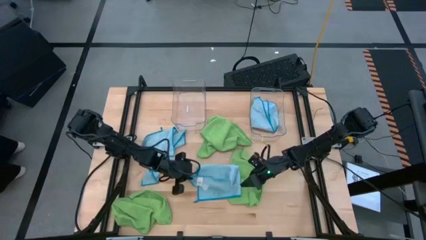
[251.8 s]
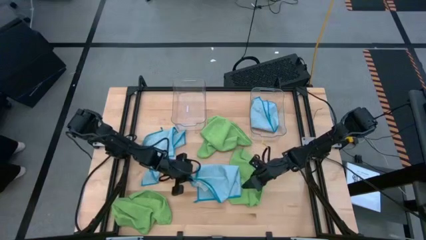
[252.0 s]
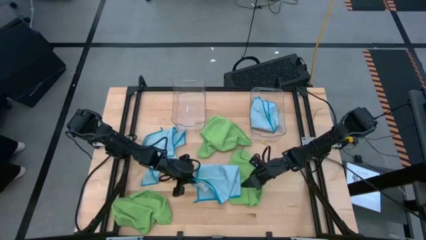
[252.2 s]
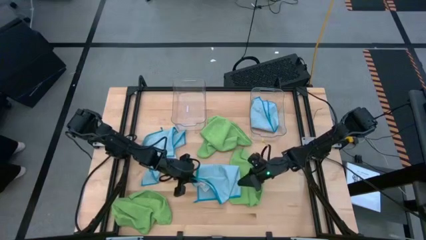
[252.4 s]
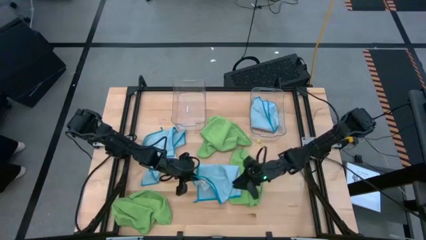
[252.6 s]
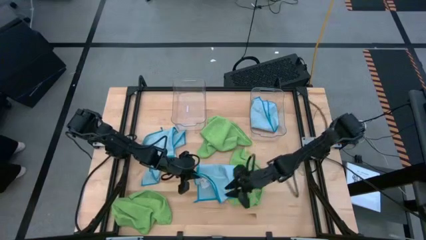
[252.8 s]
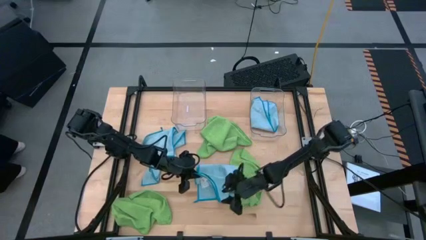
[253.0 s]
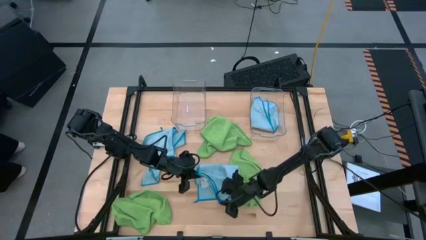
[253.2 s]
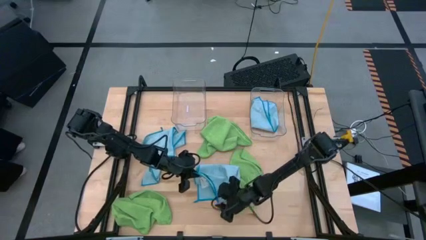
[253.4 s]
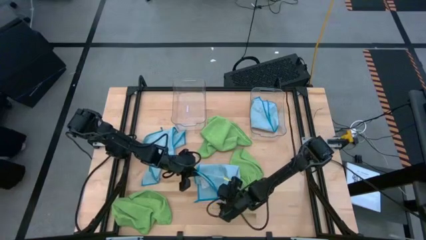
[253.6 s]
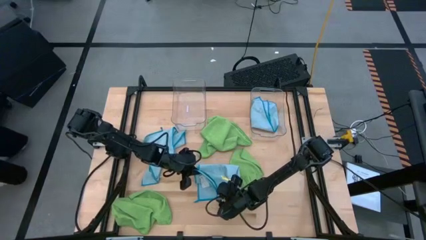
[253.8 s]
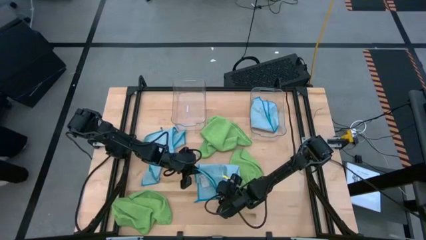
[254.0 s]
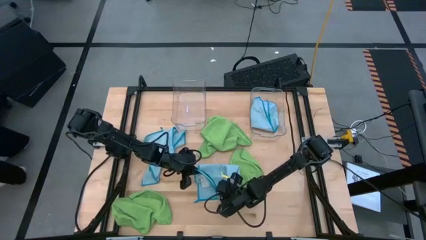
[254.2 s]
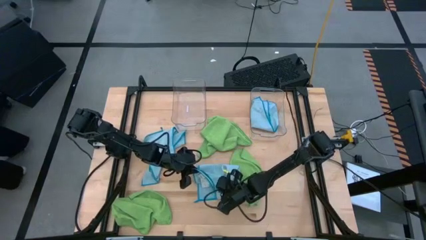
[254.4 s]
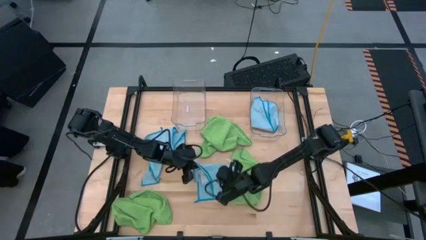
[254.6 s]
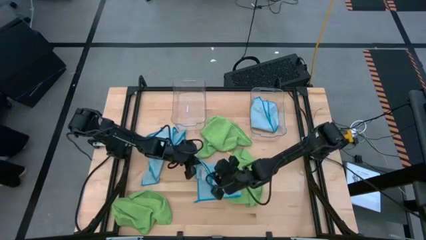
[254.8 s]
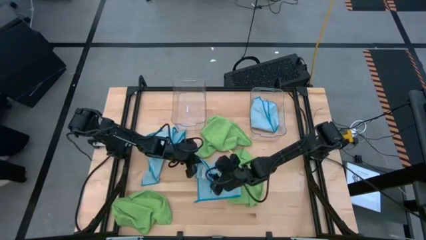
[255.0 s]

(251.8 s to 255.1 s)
Task: Fold microfiber towels
Fold the right blue microfiber towel

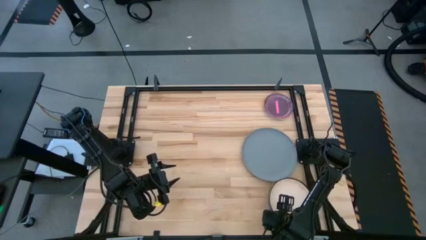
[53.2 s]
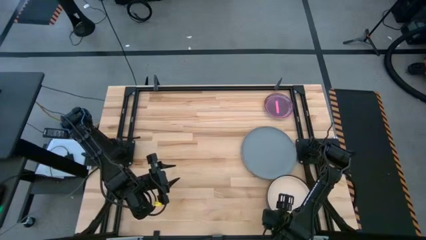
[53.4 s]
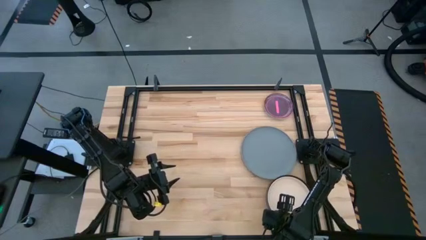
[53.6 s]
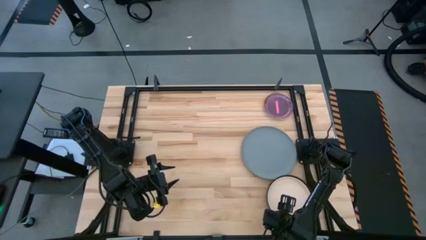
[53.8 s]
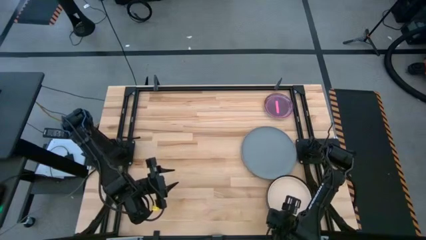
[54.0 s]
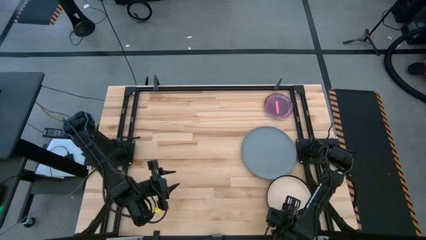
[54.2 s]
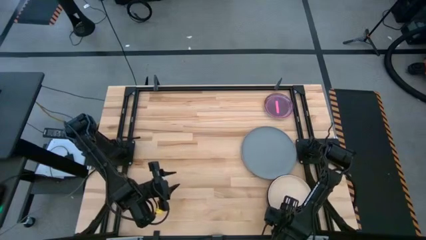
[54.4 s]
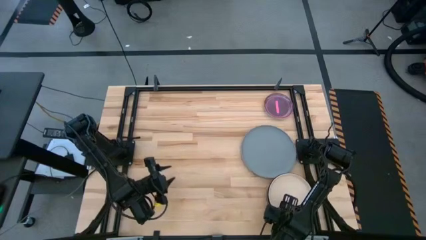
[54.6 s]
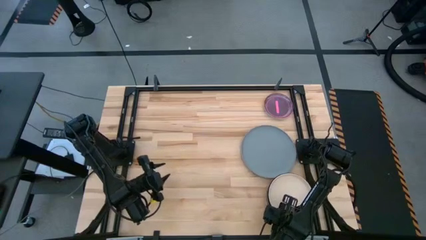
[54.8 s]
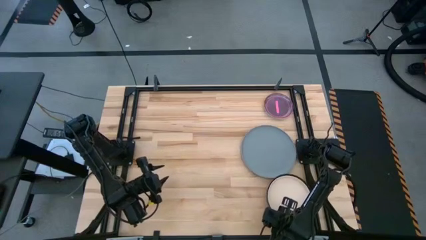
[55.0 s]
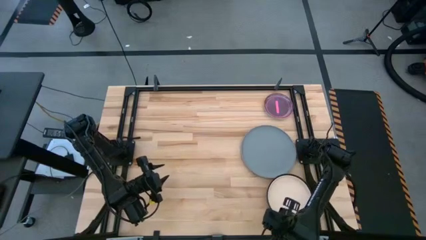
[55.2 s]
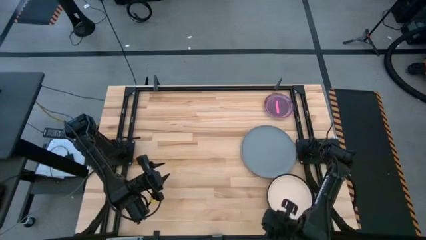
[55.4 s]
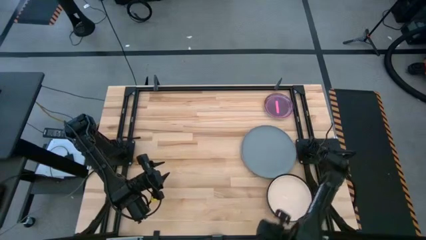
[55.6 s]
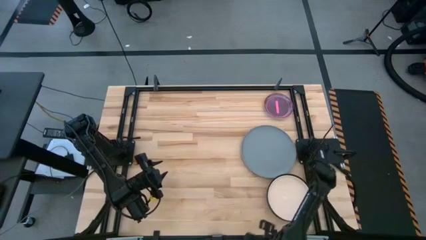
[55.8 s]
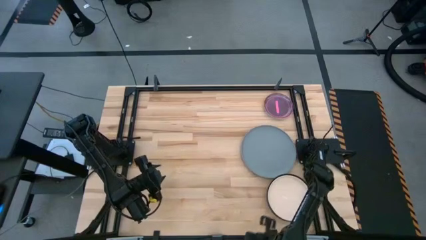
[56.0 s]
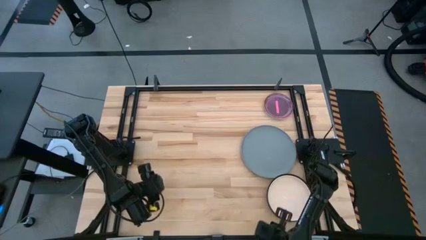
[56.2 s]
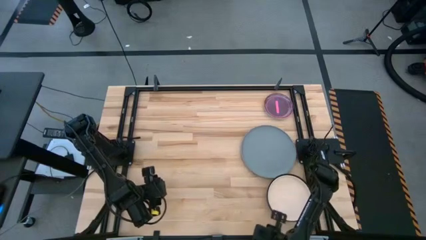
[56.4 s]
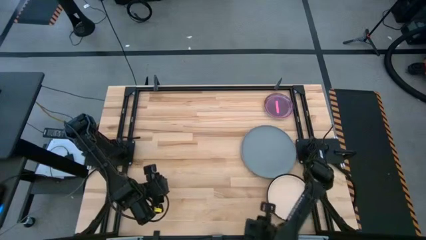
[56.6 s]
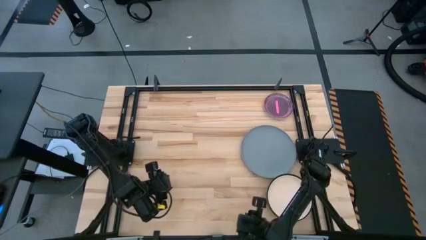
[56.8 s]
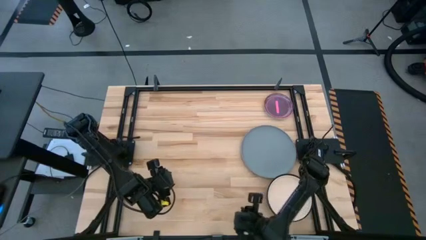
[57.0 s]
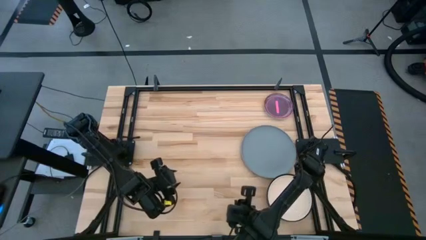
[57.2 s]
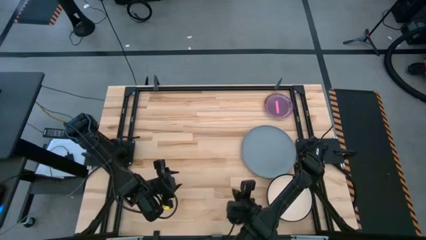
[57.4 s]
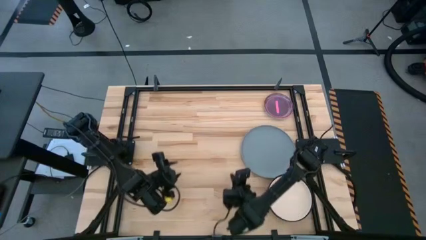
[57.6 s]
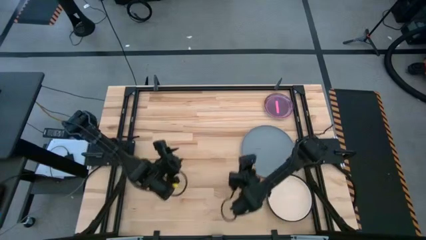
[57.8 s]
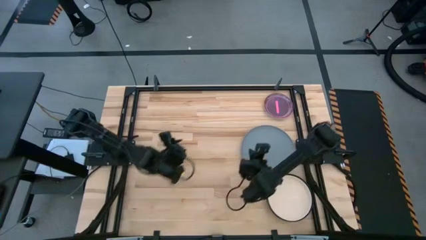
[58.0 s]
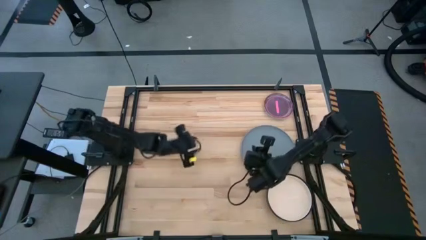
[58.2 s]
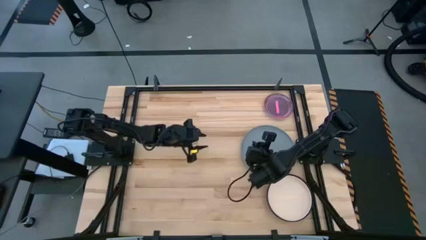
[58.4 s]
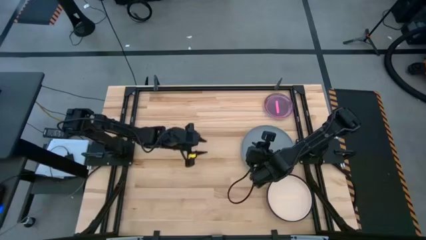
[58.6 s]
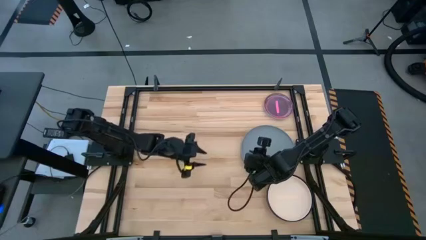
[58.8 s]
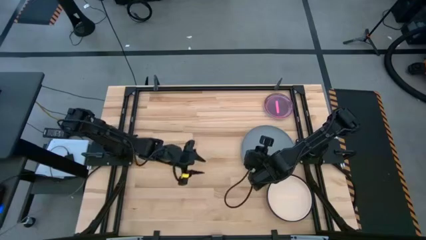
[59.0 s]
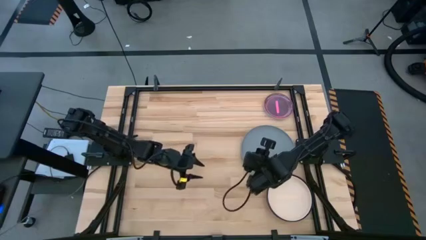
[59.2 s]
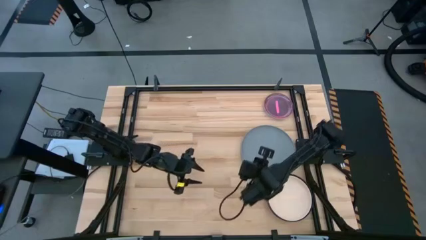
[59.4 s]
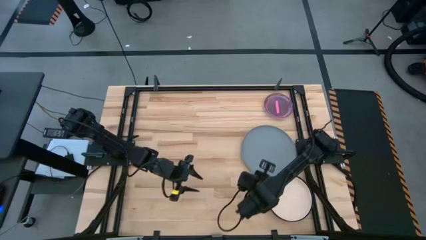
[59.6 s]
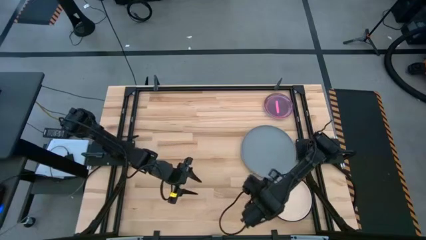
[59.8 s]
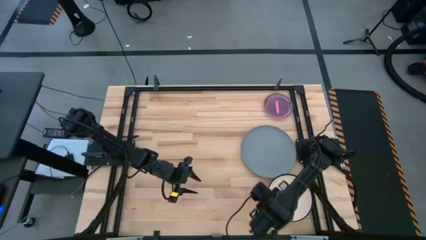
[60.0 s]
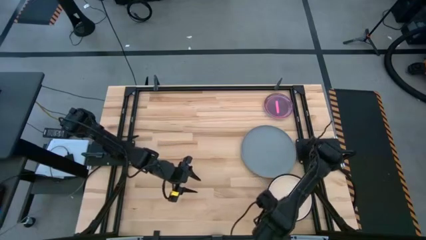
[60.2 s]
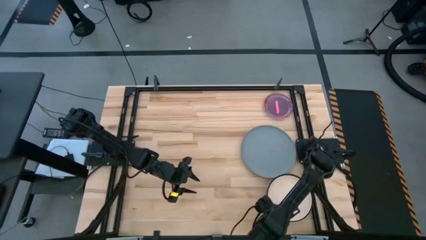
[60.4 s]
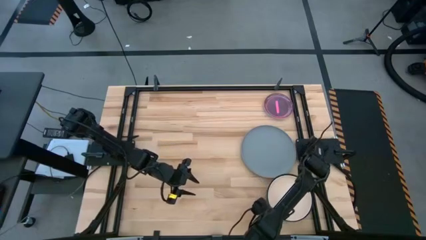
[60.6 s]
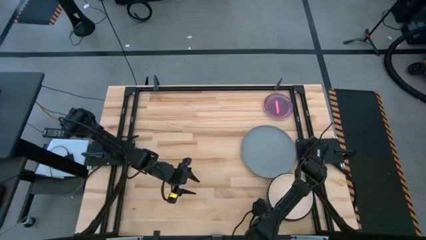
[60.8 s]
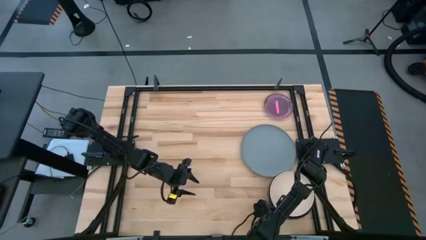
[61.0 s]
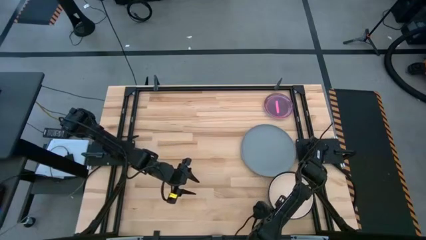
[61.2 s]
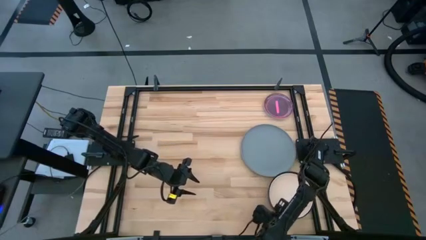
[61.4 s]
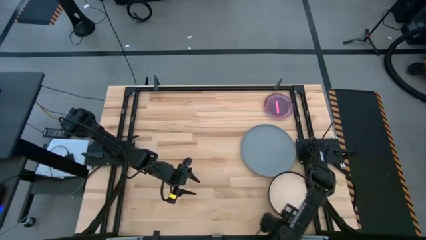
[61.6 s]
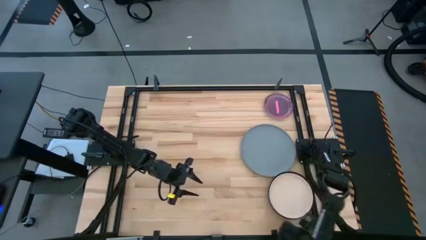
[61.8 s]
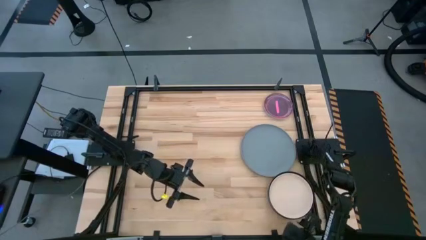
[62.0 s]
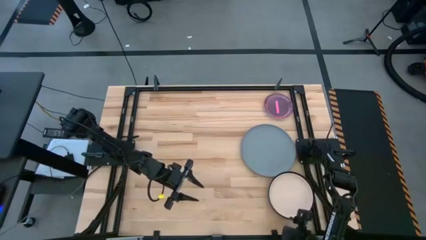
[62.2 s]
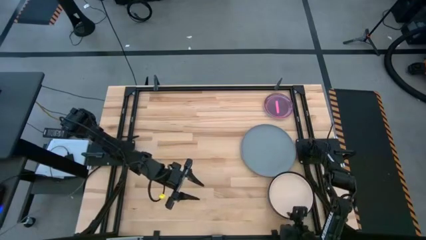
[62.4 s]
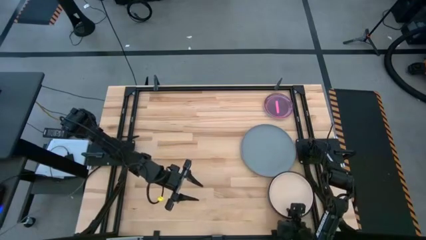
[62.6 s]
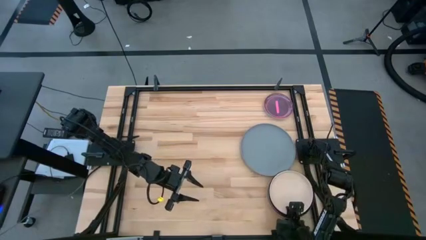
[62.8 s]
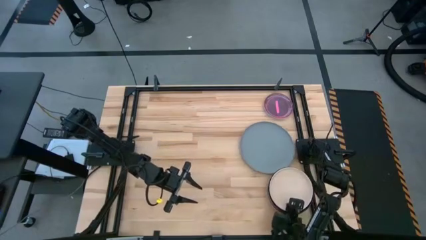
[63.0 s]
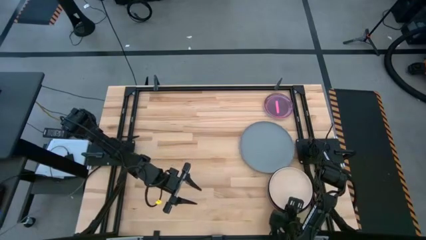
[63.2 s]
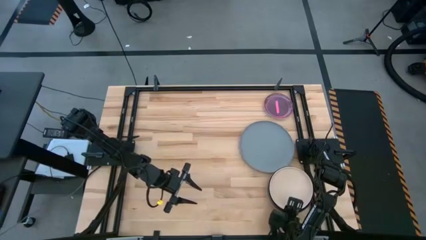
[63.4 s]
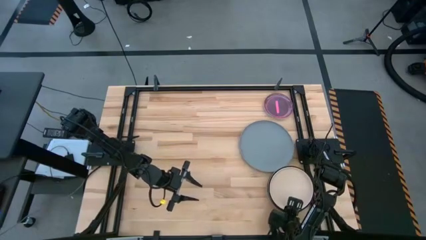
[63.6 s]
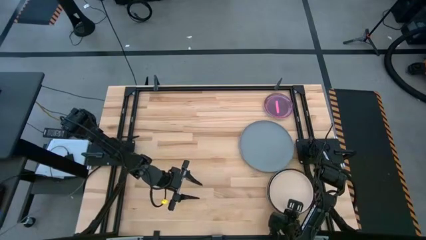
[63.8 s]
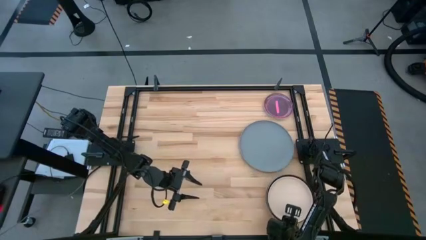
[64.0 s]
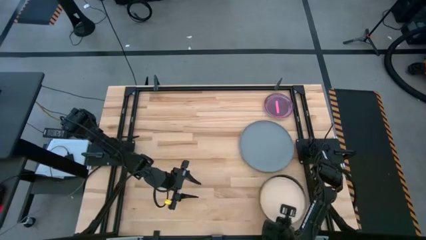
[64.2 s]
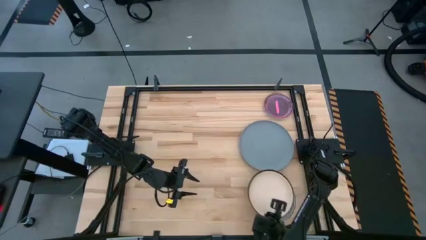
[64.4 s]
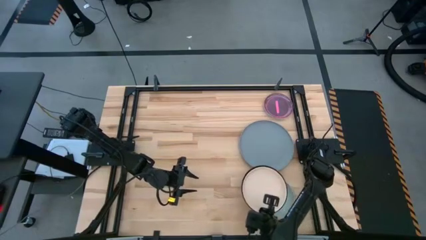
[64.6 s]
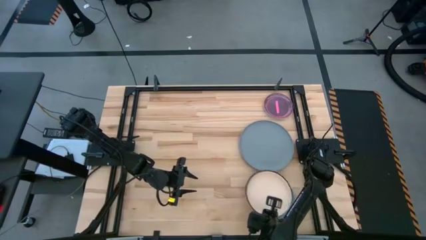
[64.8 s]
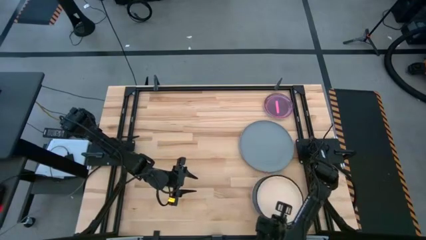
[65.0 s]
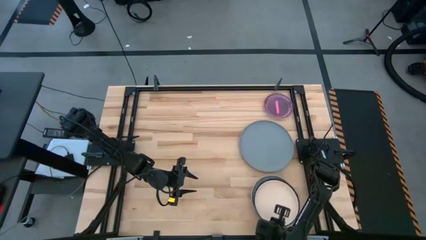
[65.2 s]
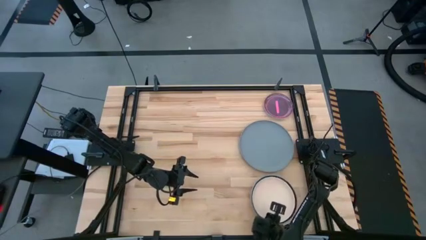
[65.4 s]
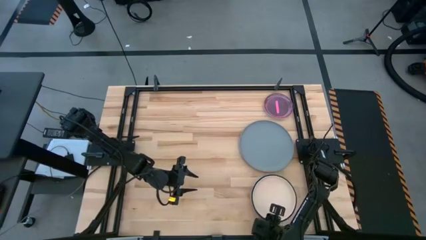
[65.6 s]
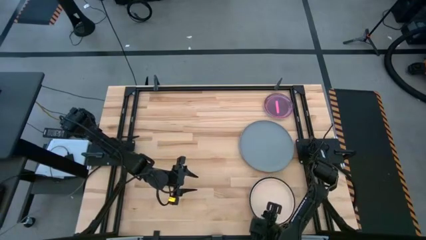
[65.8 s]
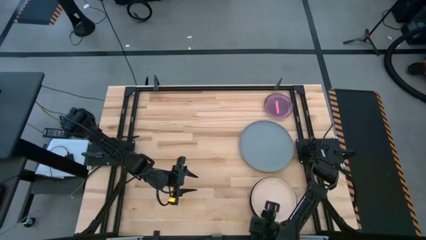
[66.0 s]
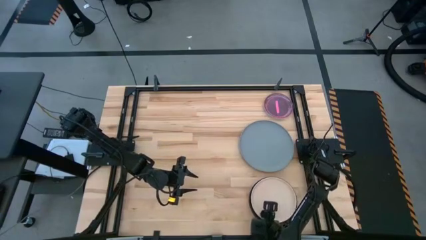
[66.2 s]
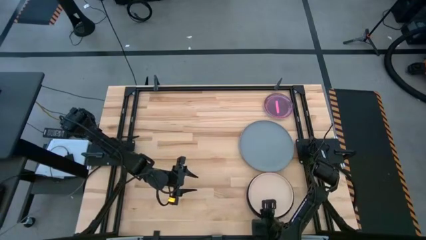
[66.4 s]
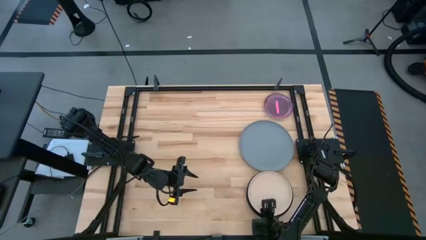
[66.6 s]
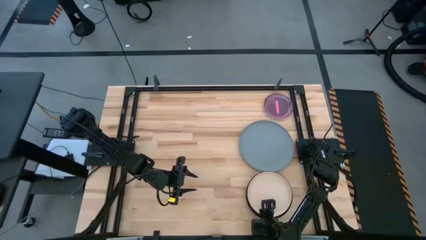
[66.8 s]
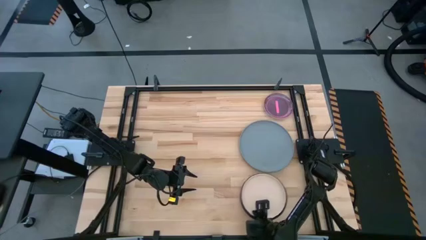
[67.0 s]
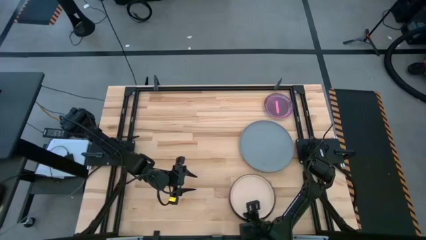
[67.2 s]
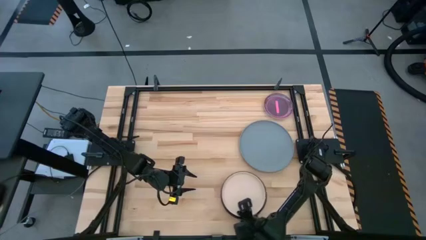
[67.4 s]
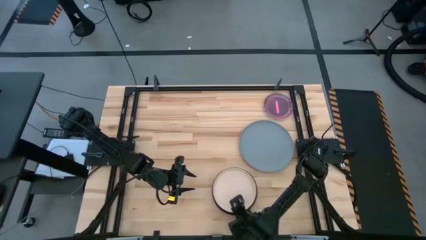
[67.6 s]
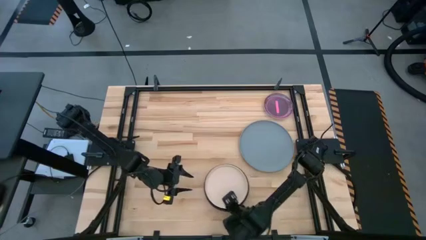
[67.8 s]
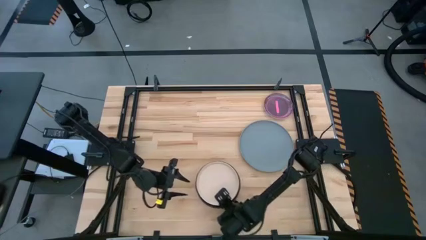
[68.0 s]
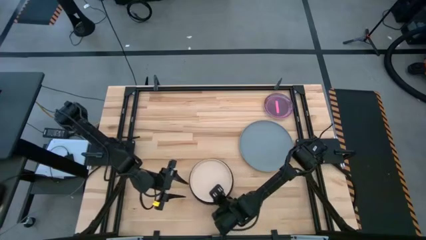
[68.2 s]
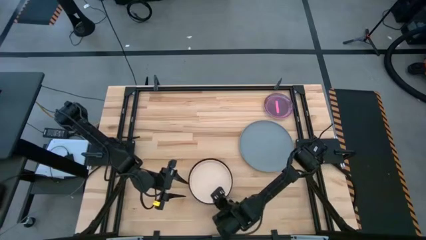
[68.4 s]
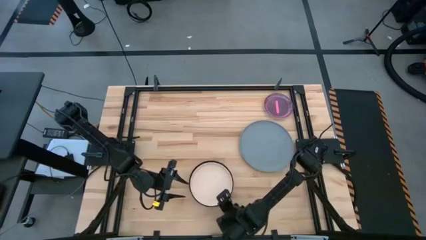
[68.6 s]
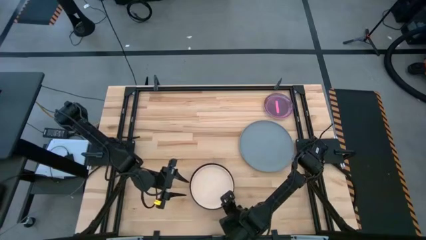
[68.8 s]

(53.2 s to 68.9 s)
Task: Stack plastic plates
Move the bottom stacked plates to the bottom middle of the table
